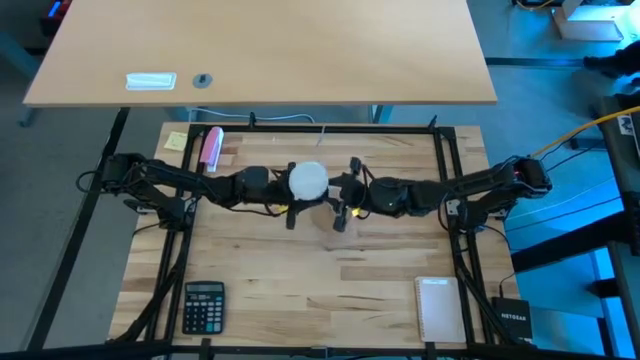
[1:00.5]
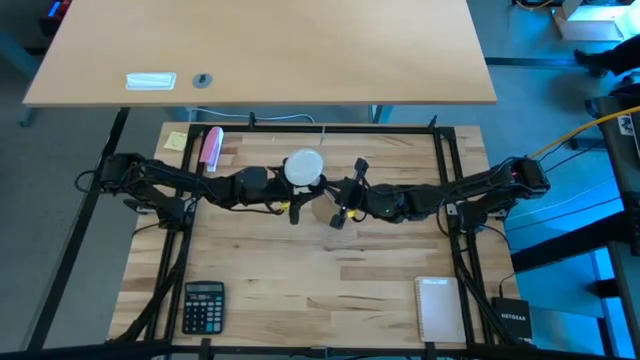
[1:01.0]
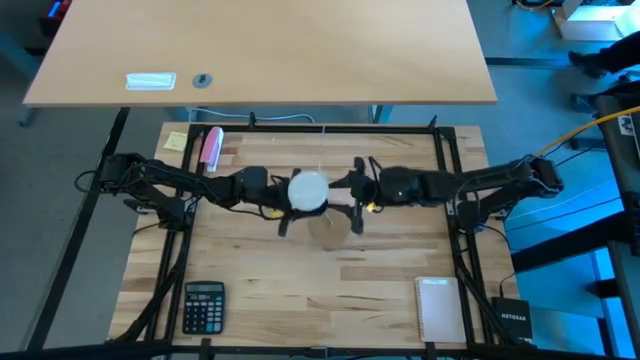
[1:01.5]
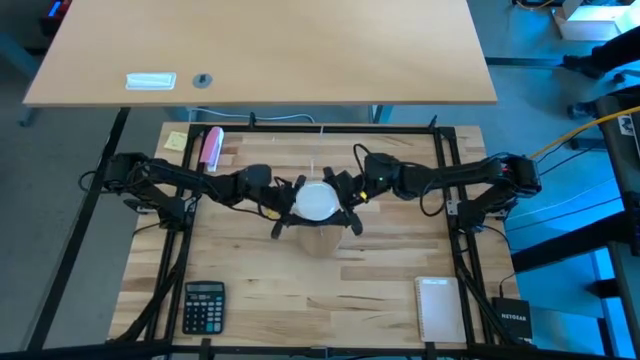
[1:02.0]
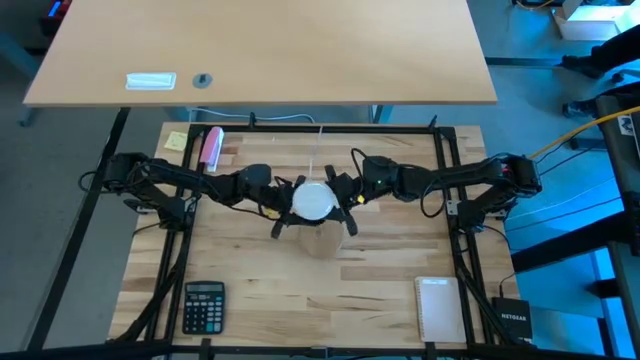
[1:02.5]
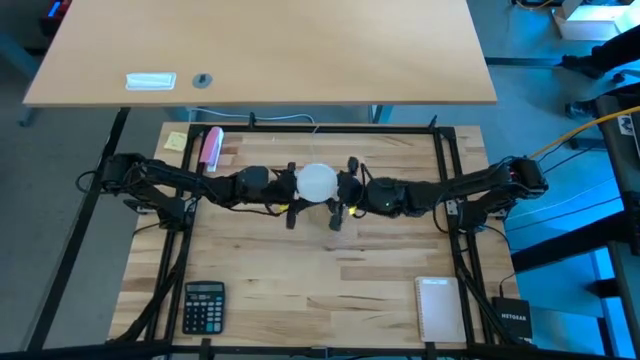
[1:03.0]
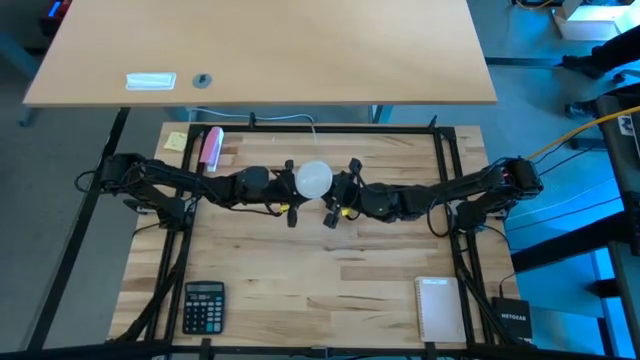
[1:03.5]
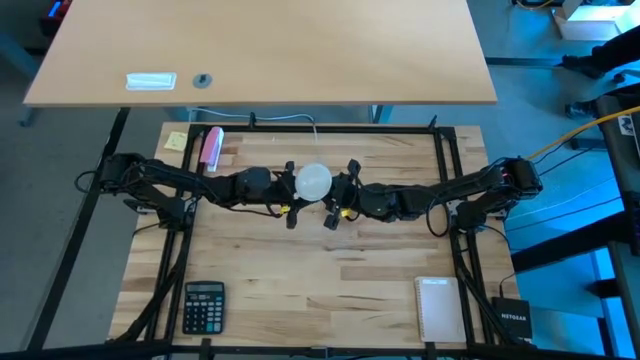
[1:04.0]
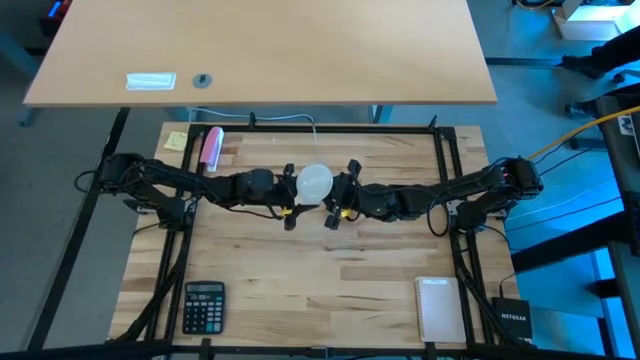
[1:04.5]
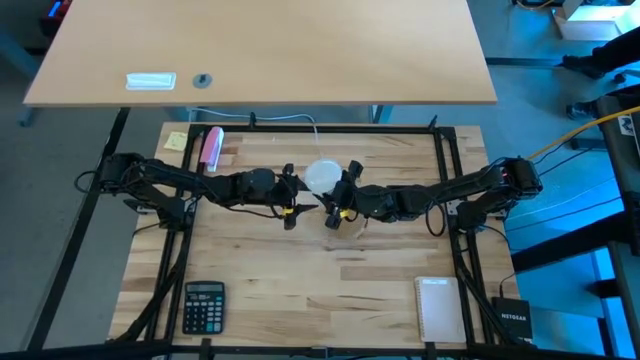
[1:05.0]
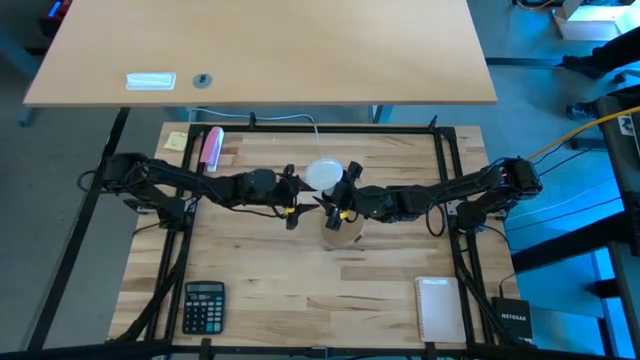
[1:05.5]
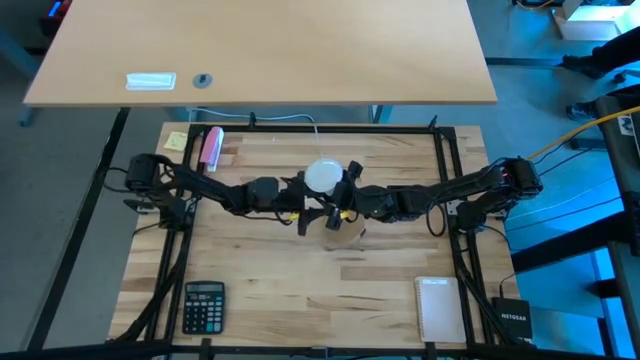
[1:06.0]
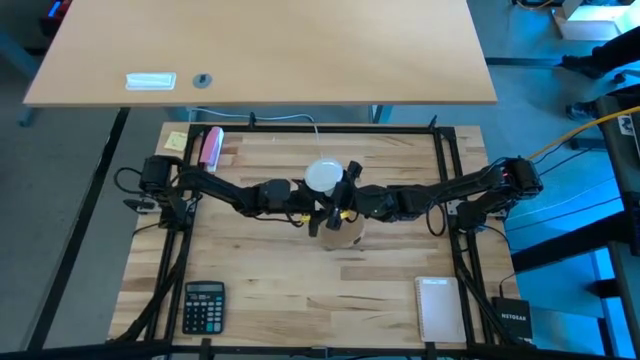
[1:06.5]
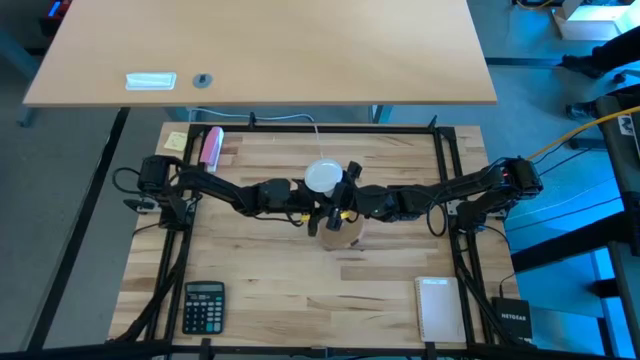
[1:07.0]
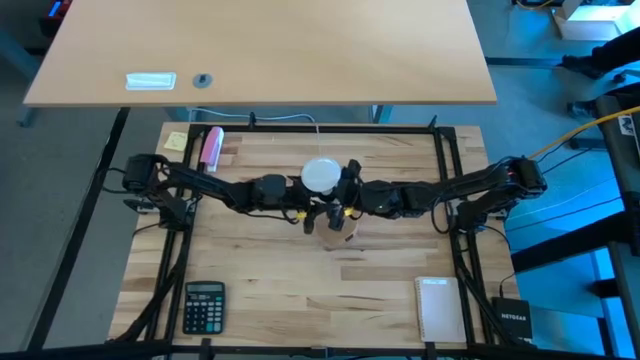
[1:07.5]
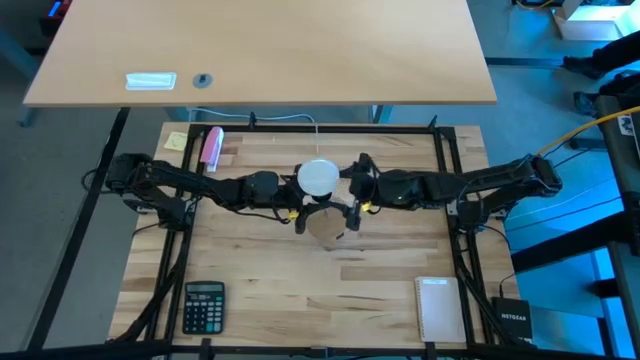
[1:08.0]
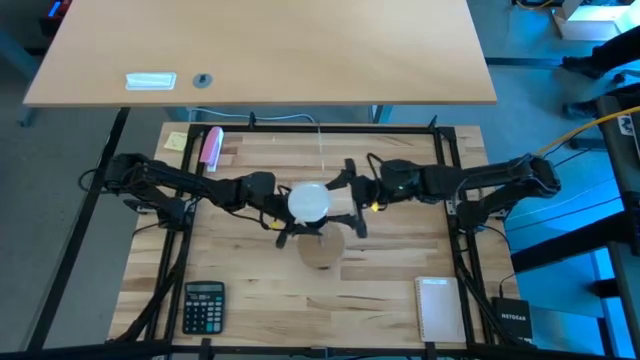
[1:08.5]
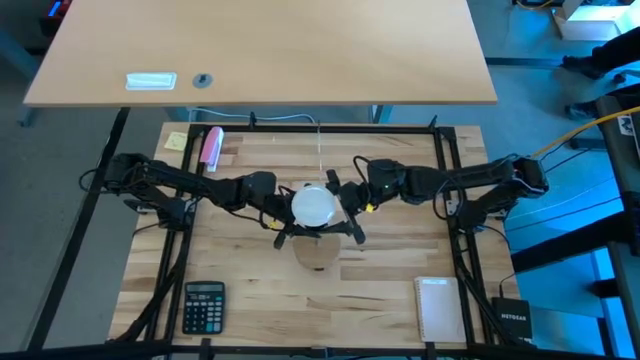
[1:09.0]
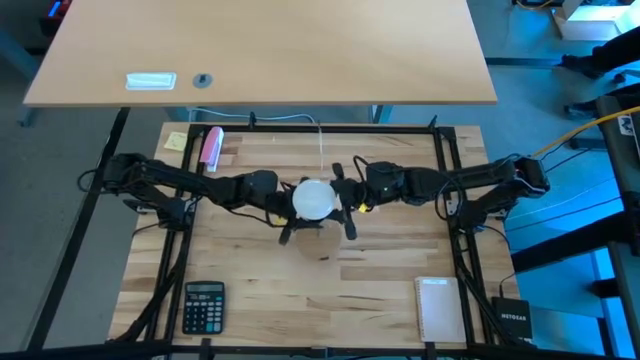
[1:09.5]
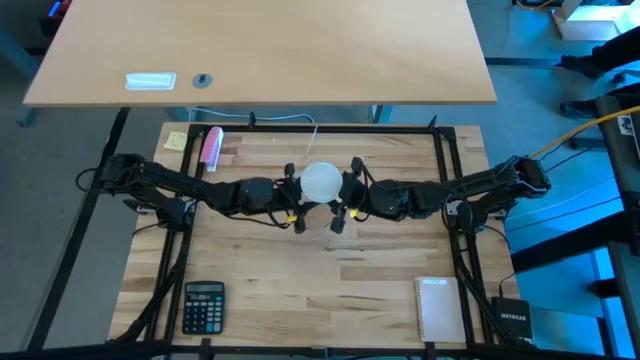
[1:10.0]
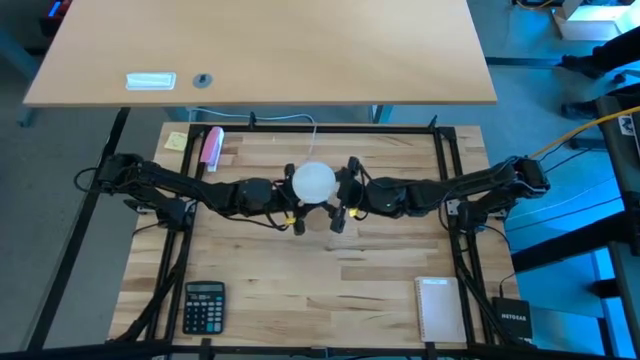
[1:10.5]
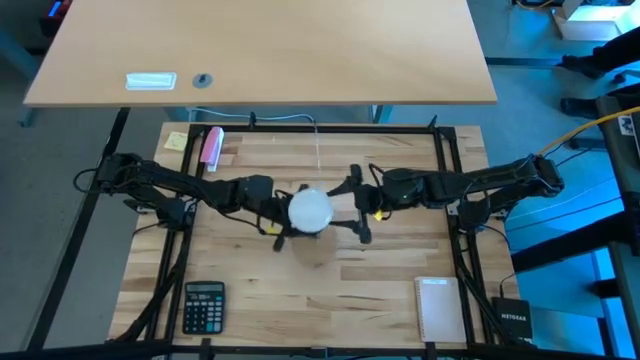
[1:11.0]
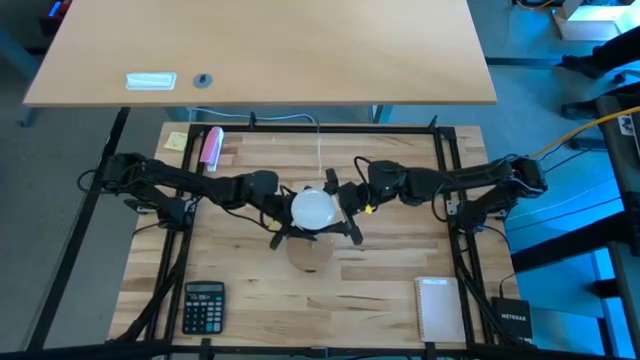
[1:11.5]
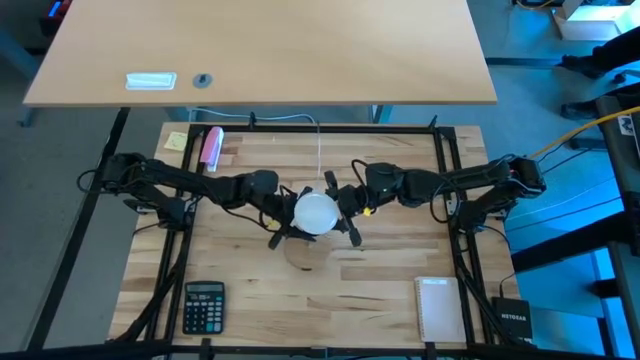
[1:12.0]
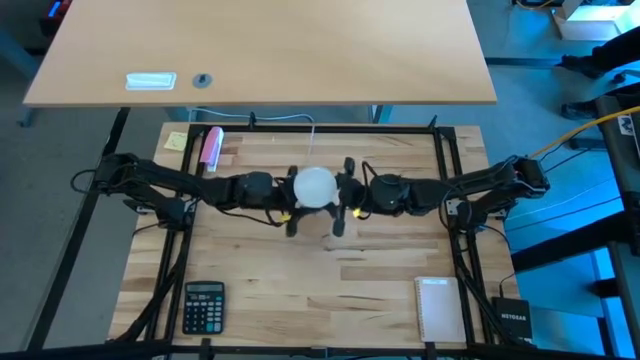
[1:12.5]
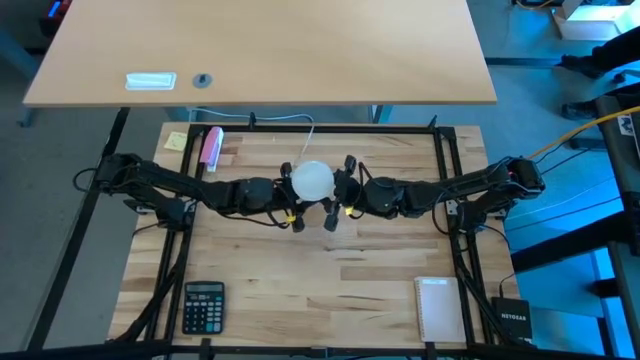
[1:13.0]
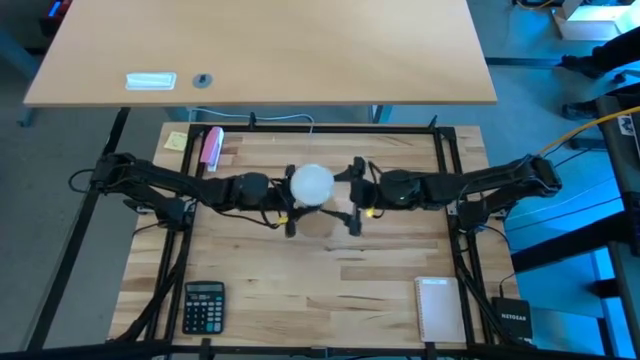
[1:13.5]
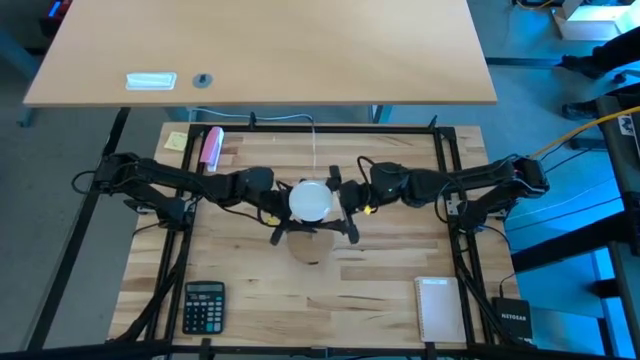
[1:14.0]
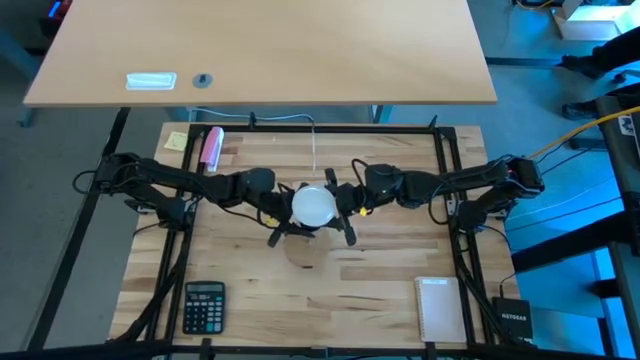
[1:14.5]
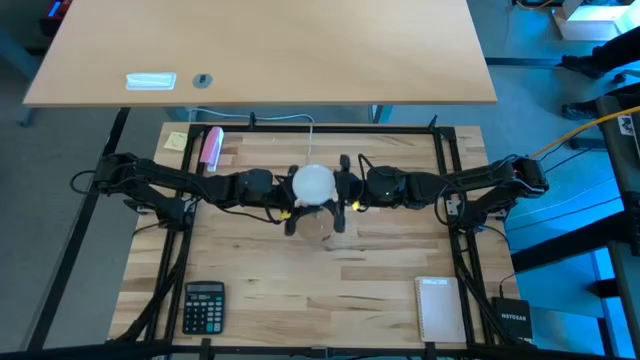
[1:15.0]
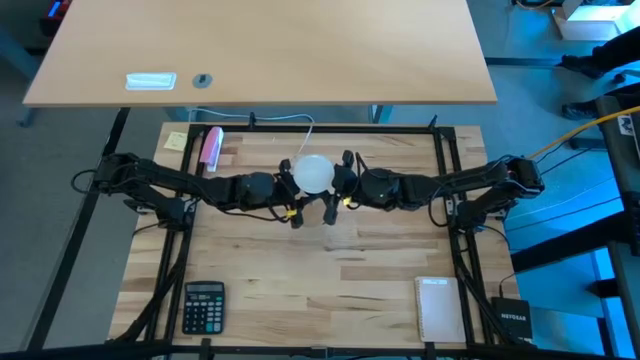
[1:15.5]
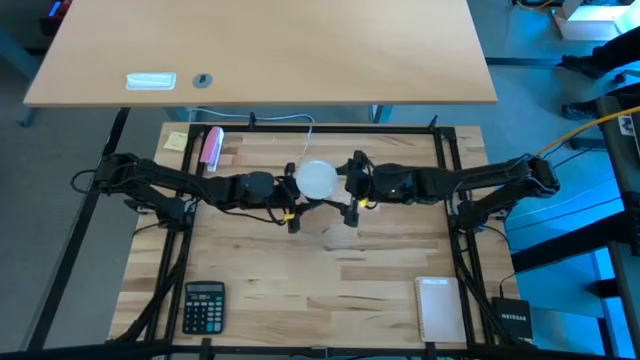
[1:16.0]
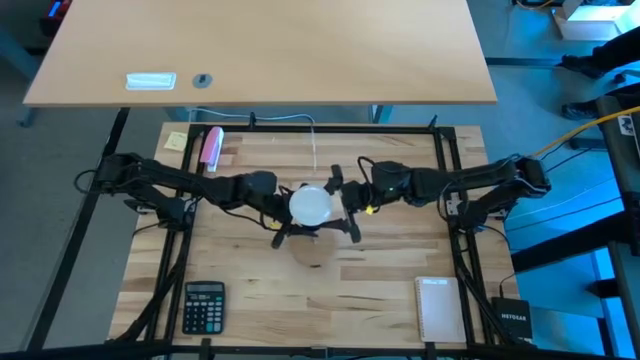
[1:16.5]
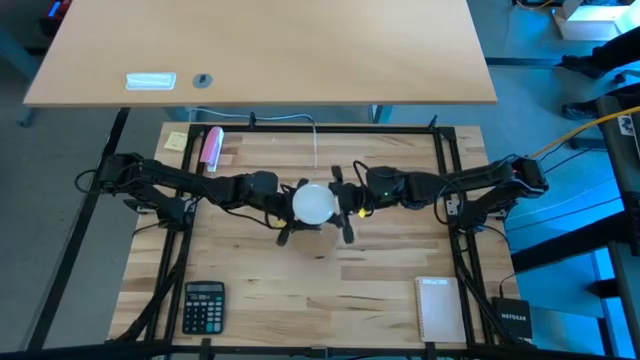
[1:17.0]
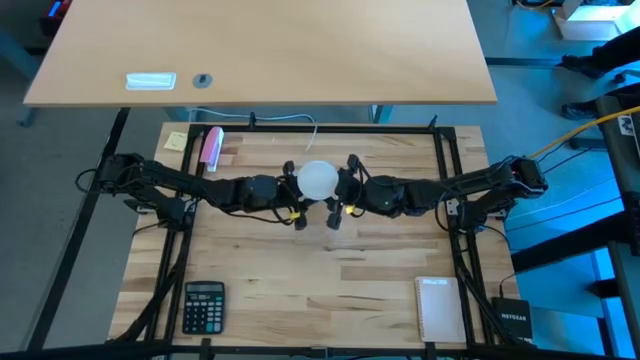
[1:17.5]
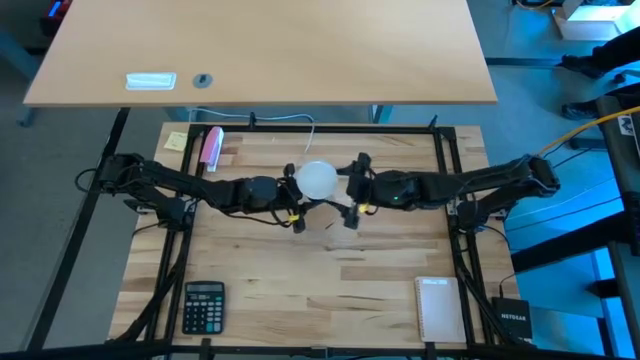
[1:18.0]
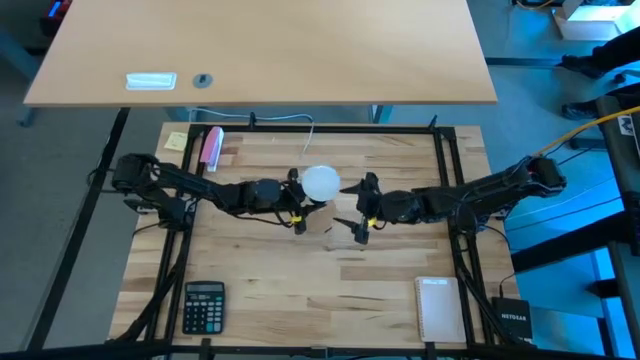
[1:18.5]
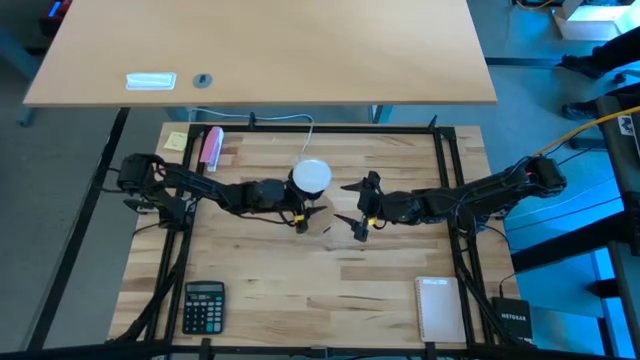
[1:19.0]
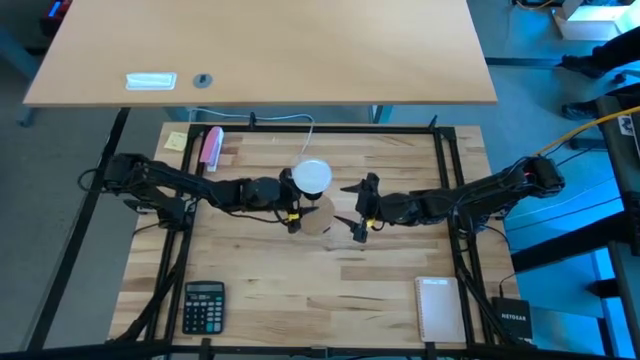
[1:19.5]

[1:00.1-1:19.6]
Task: Screw lightbulb
Insert the white lightbulb into the brown lamp
